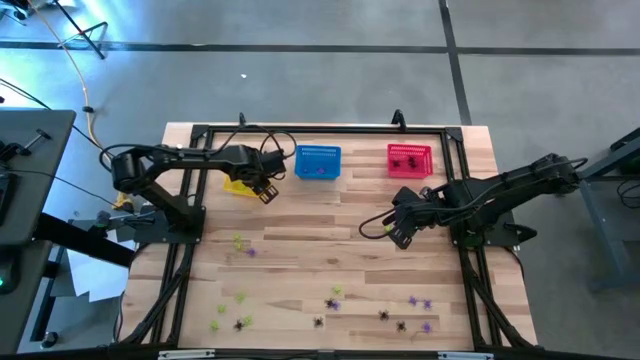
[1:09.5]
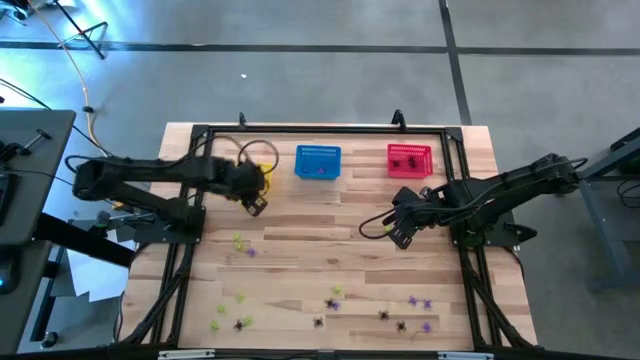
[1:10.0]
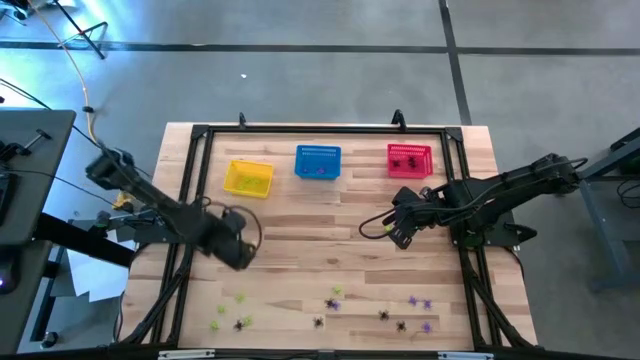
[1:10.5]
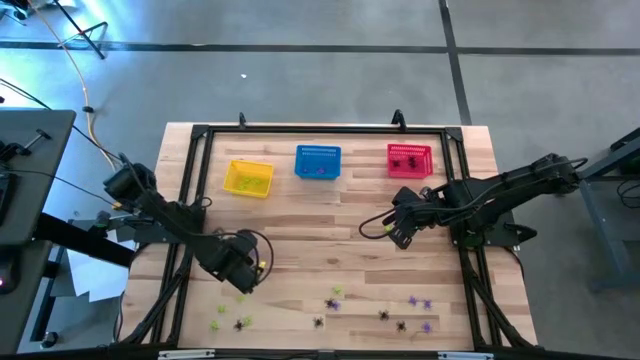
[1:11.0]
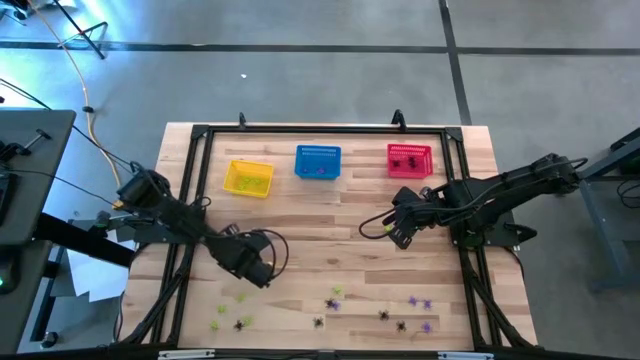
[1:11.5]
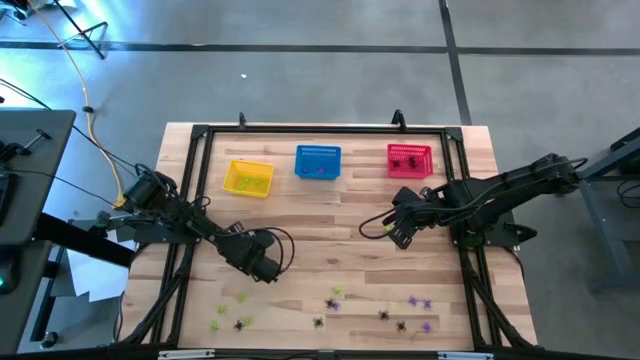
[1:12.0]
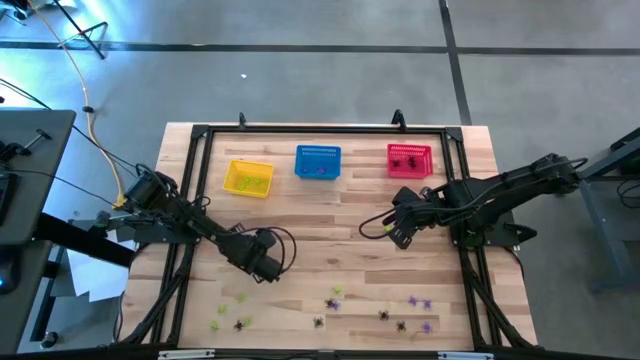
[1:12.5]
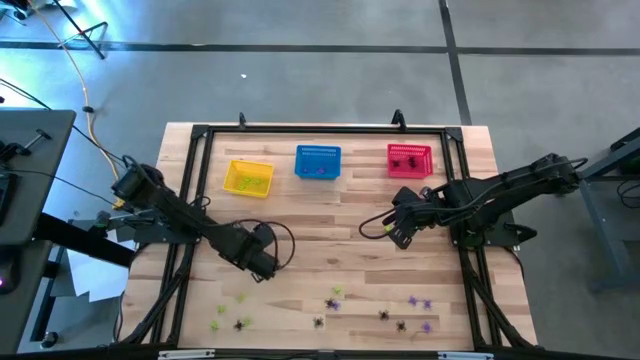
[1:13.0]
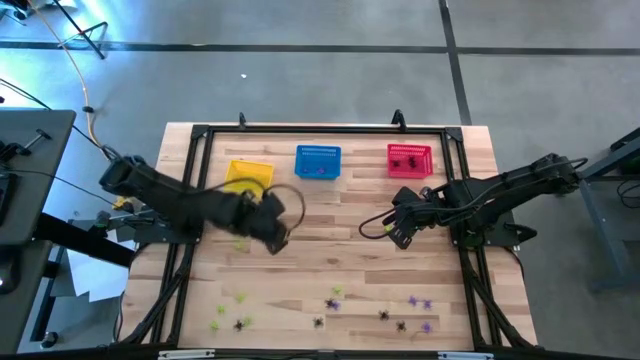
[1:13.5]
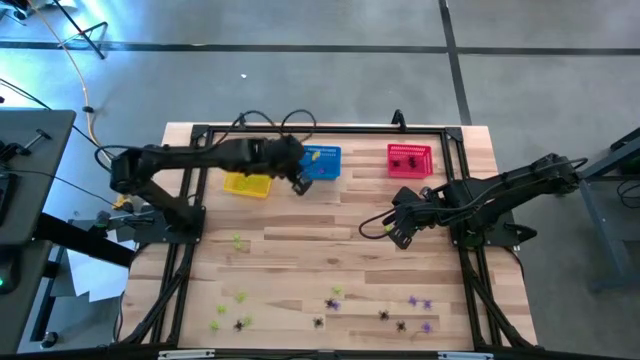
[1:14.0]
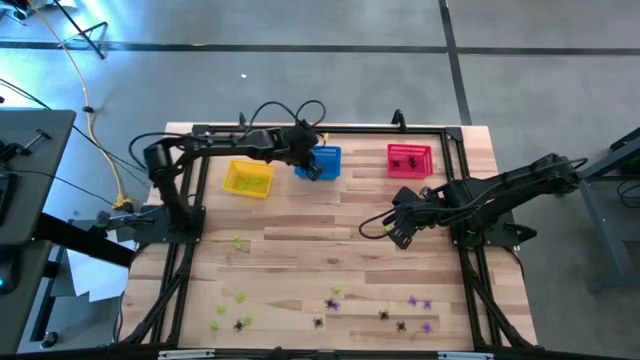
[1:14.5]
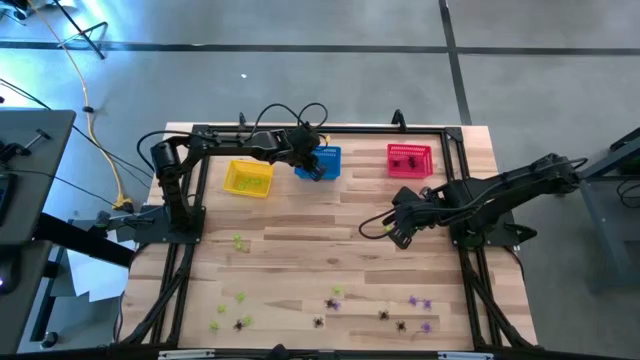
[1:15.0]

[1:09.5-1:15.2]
Task: Sort Halloween decoration
Put the purple spider toy into the blue bin

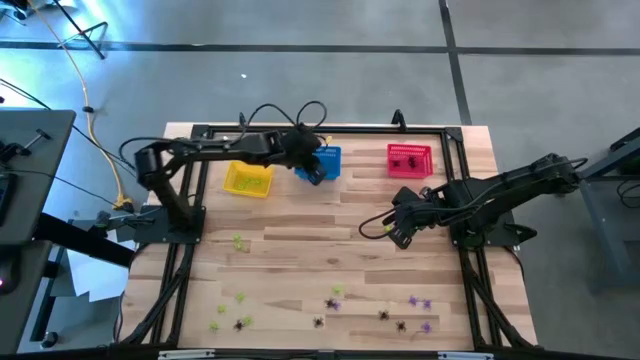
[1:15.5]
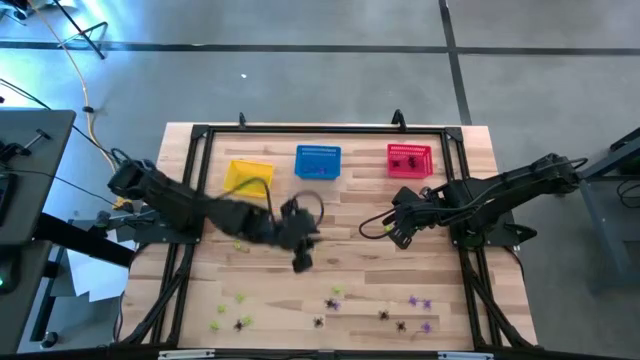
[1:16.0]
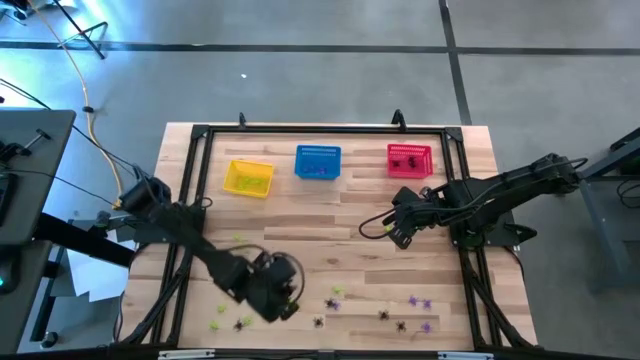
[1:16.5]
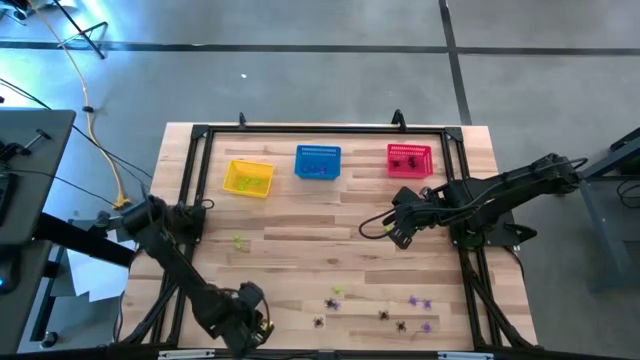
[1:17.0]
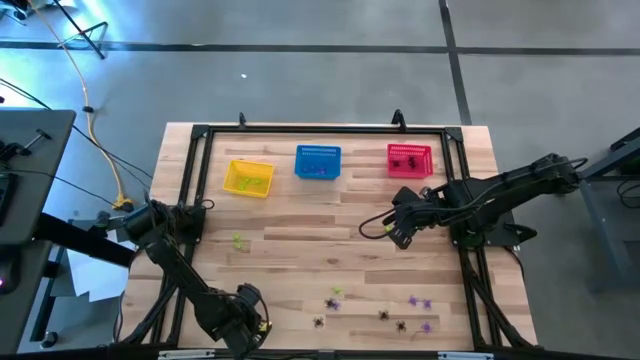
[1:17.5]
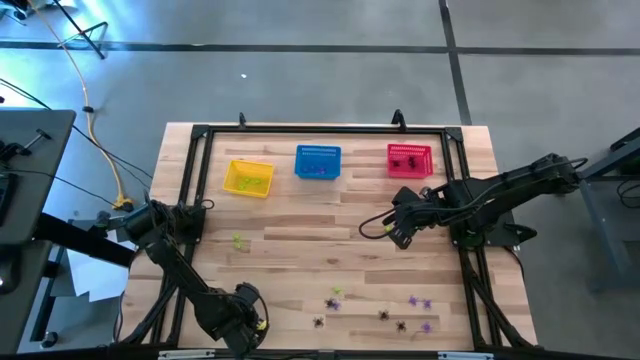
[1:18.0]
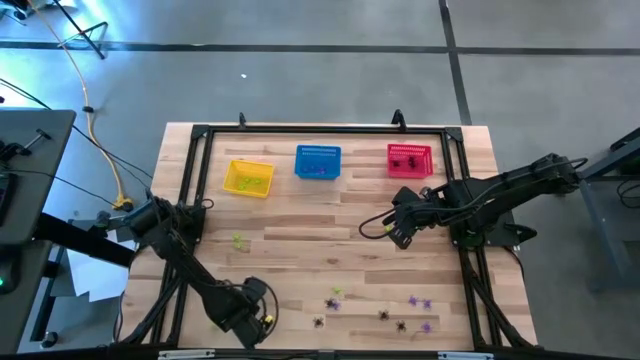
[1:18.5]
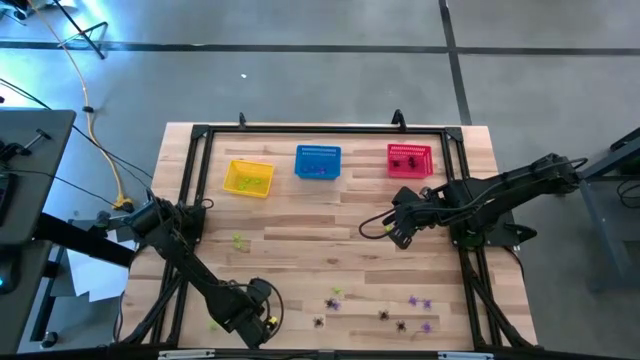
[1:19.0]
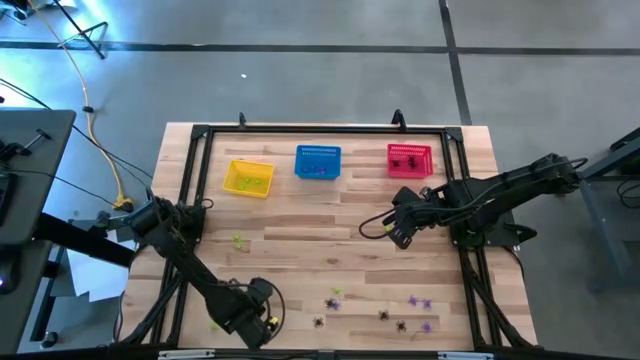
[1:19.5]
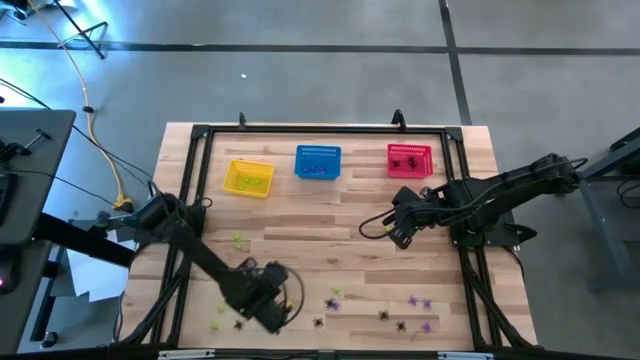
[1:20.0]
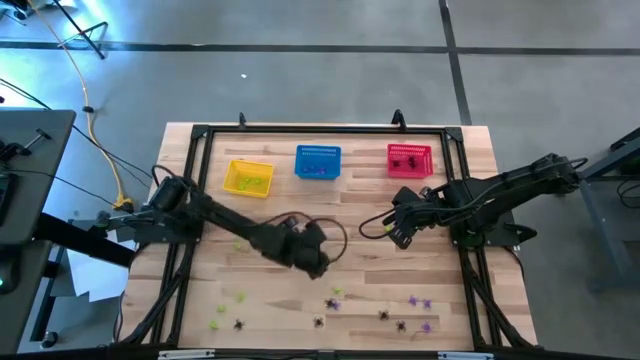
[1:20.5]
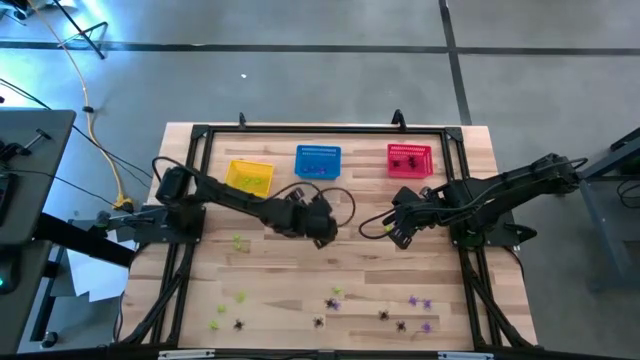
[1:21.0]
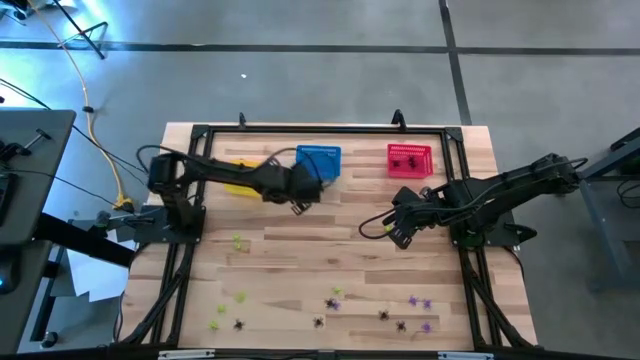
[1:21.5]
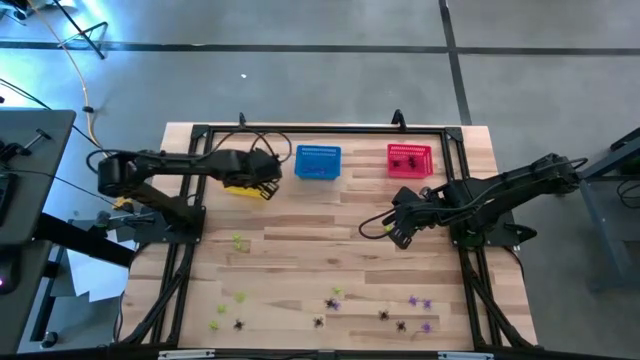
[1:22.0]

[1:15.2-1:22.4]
Put the green spider toy into the yellow bin

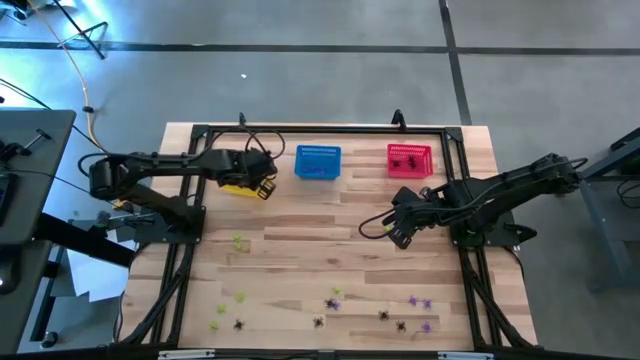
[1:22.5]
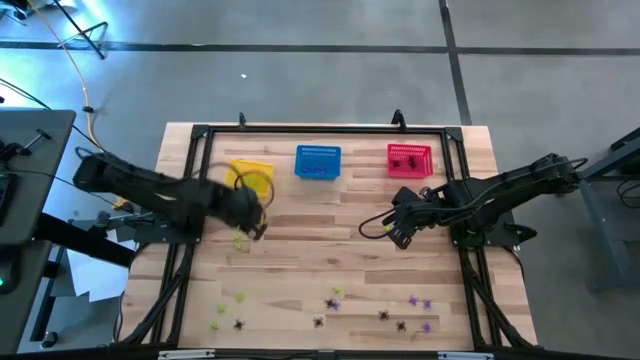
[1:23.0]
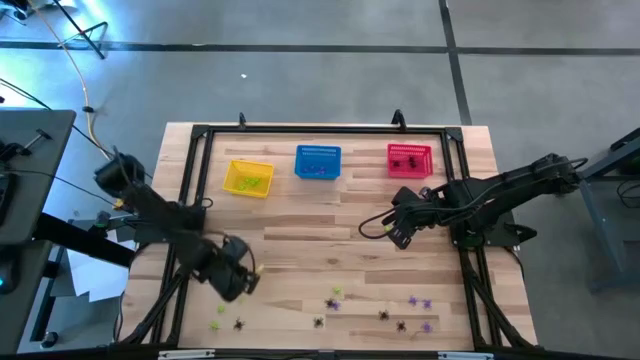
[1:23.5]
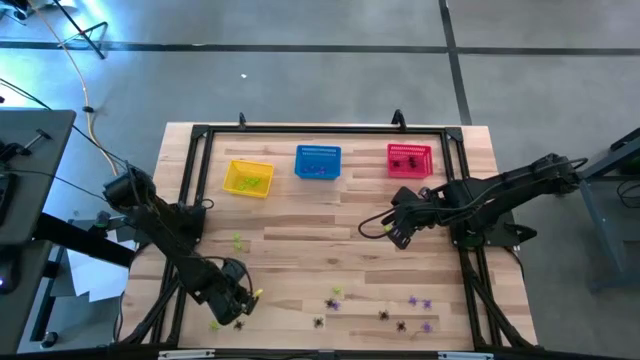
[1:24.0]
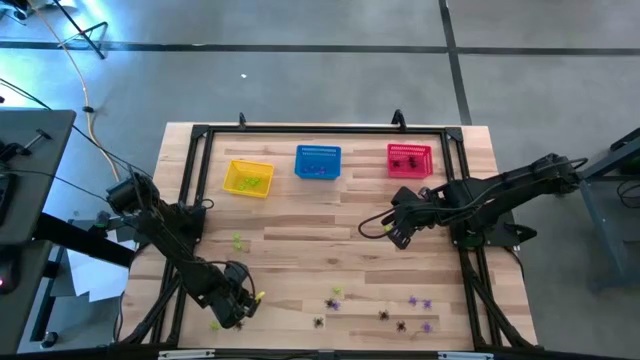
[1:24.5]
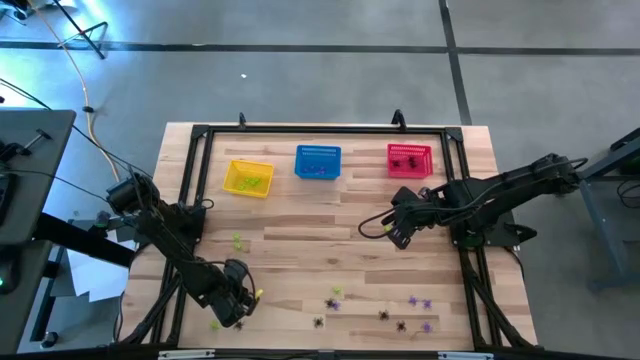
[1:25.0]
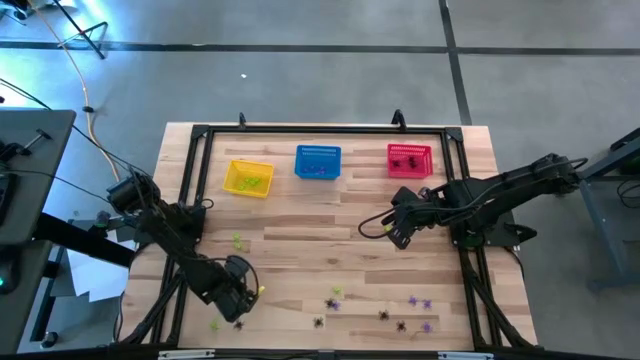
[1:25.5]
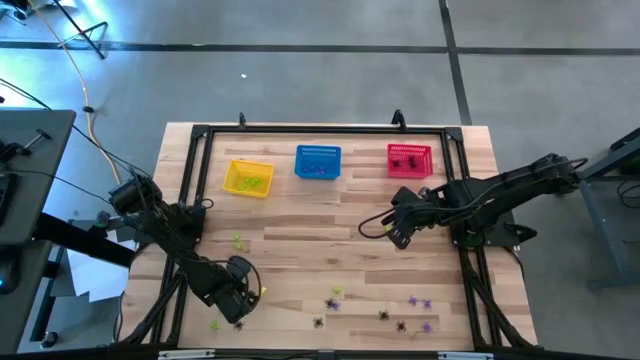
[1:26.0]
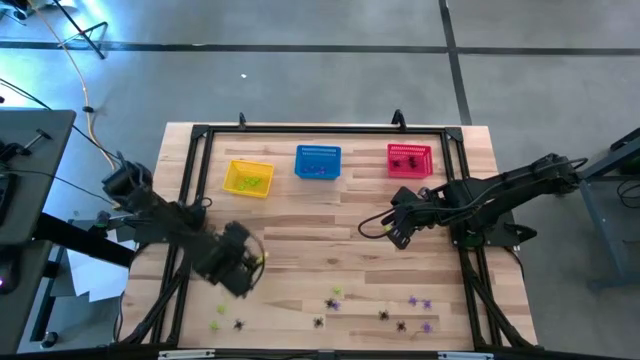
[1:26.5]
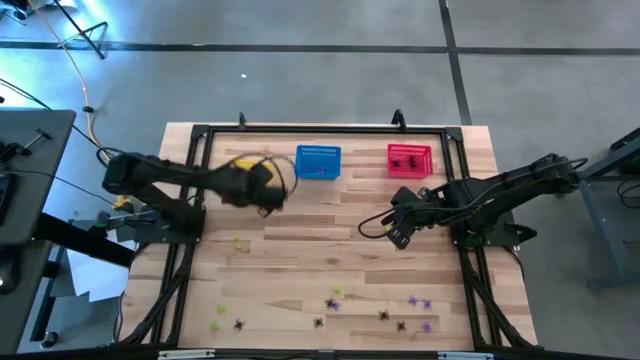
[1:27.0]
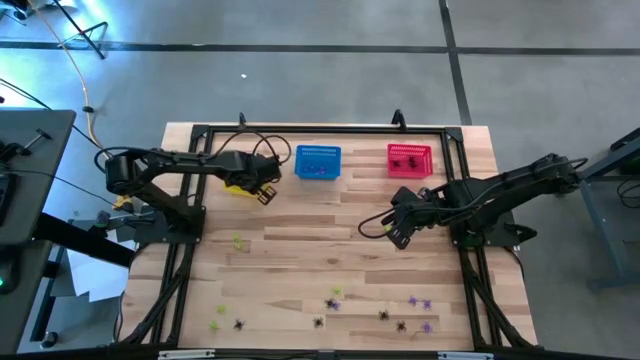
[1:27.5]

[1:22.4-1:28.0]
Put the green spider toy into the yellow bin

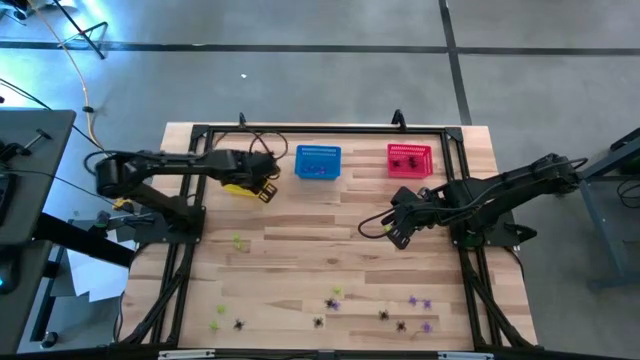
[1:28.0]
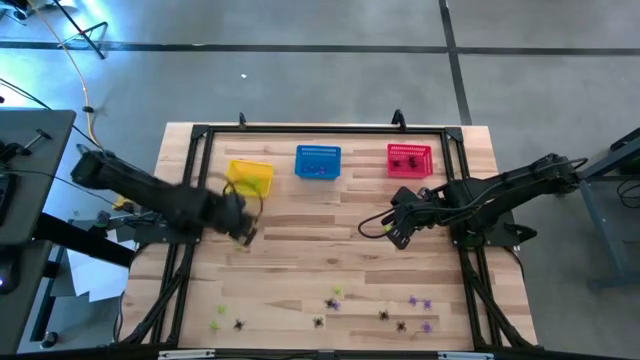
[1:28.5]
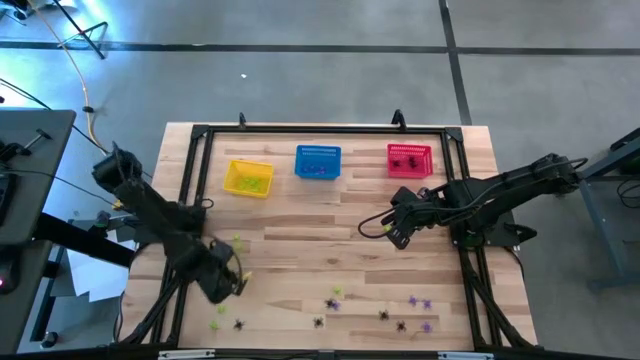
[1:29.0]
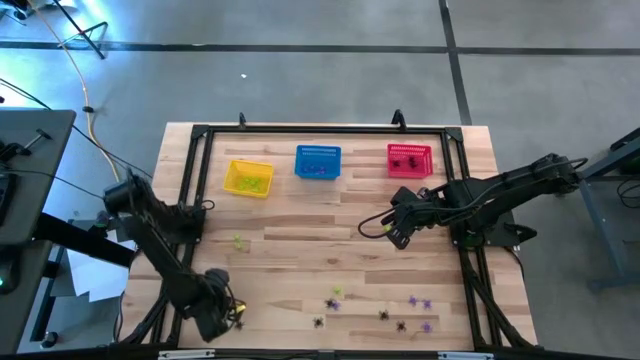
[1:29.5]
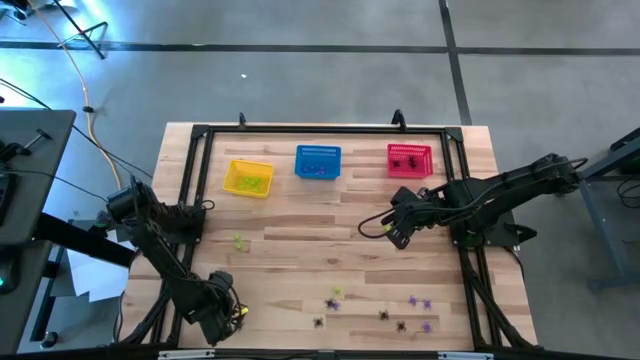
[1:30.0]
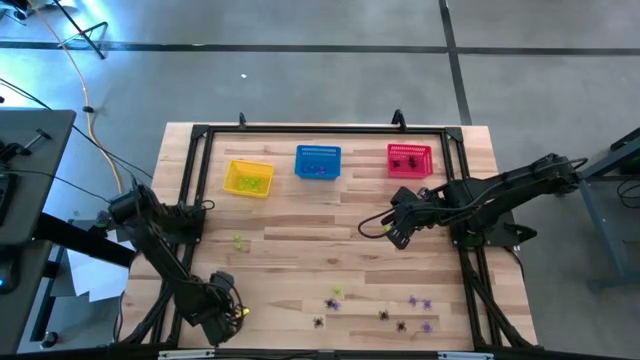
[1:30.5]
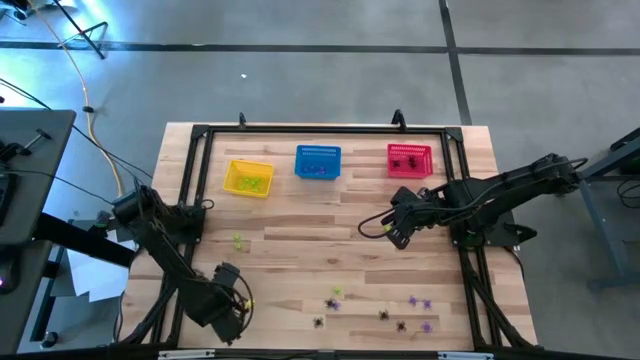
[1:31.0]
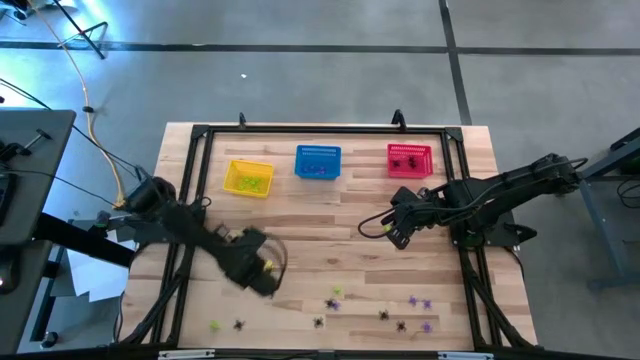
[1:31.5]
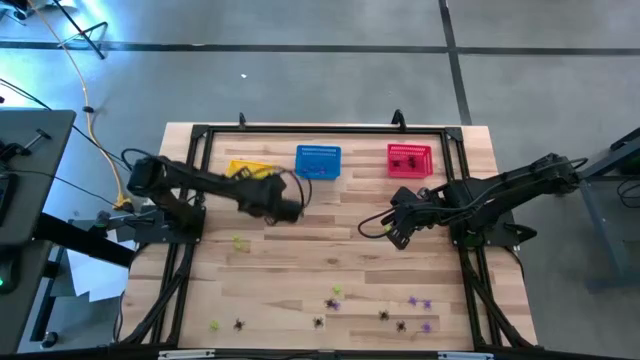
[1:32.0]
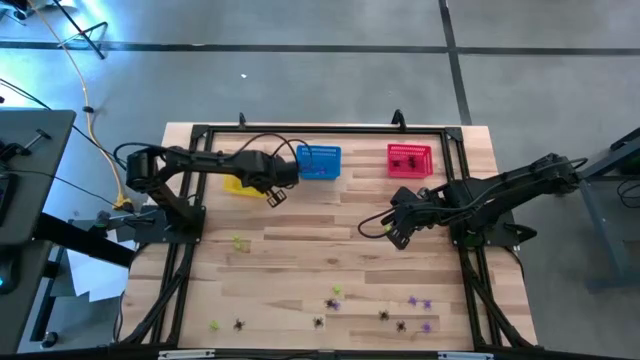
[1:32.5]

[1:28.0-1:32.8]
Put the green spider toy into the yellow bin
